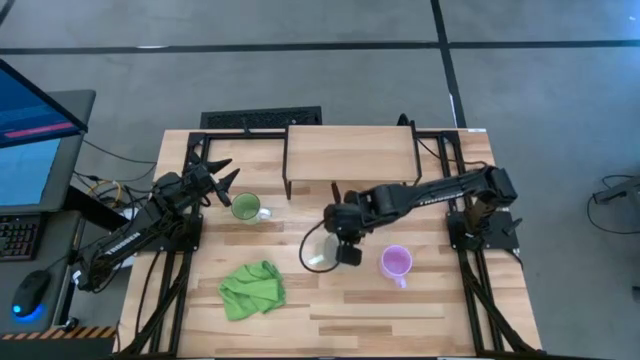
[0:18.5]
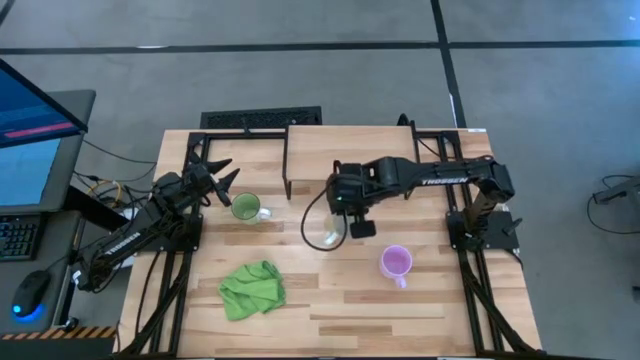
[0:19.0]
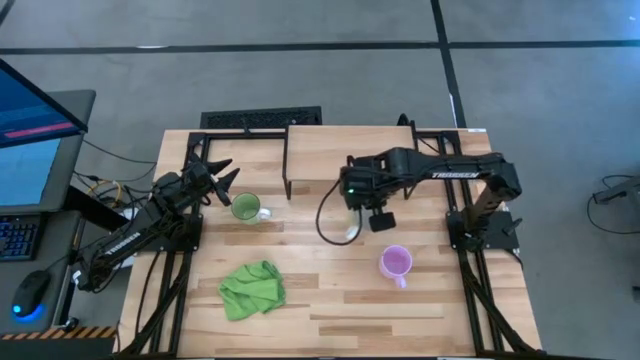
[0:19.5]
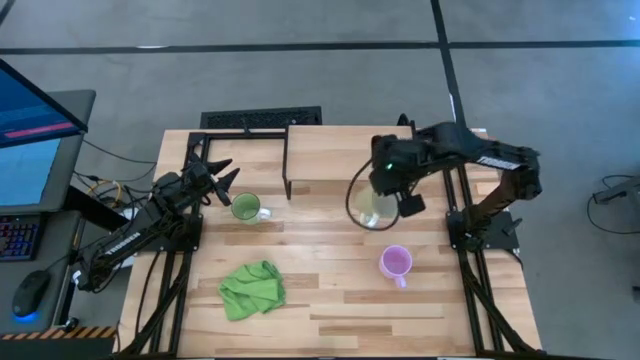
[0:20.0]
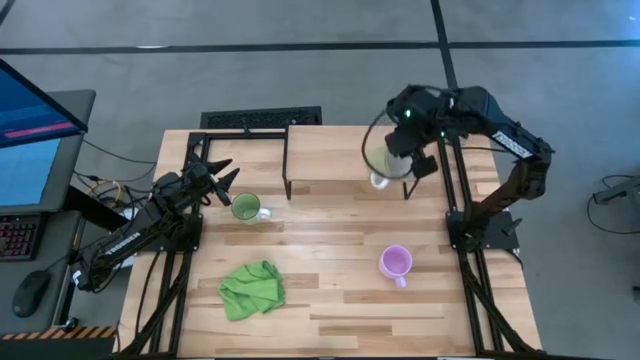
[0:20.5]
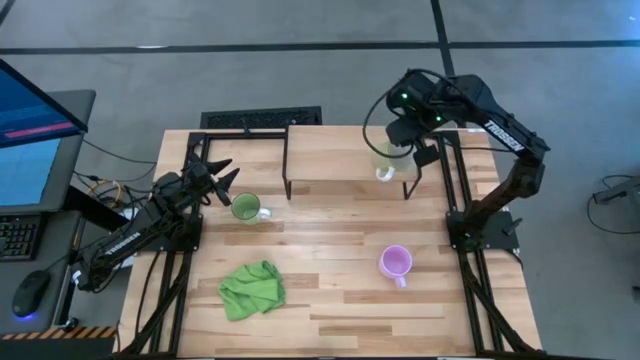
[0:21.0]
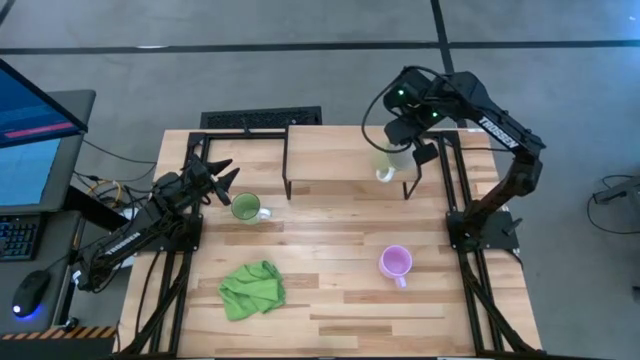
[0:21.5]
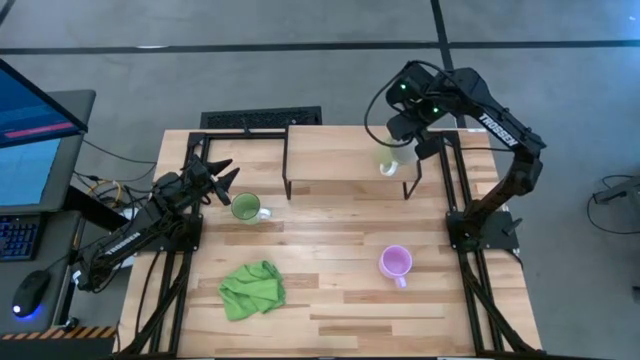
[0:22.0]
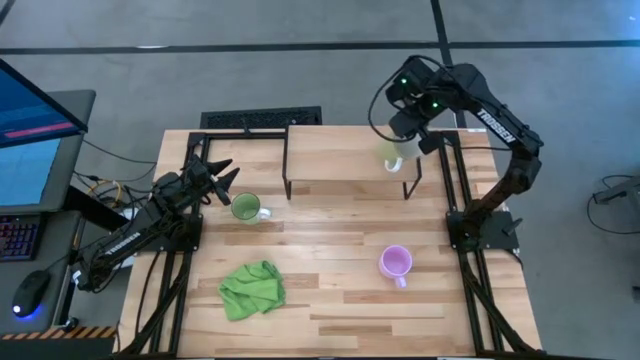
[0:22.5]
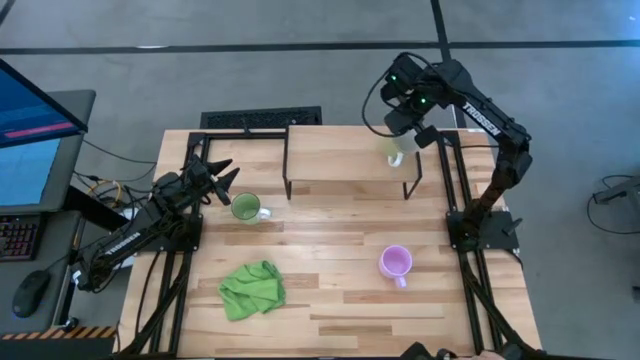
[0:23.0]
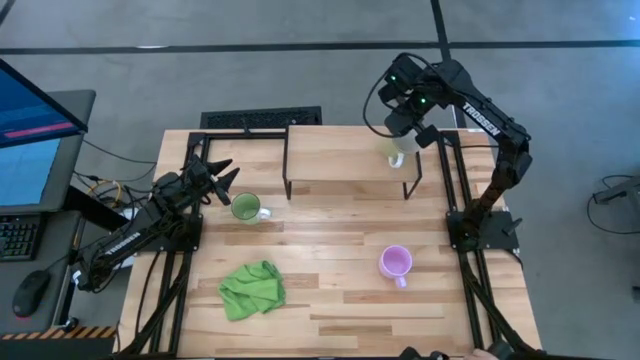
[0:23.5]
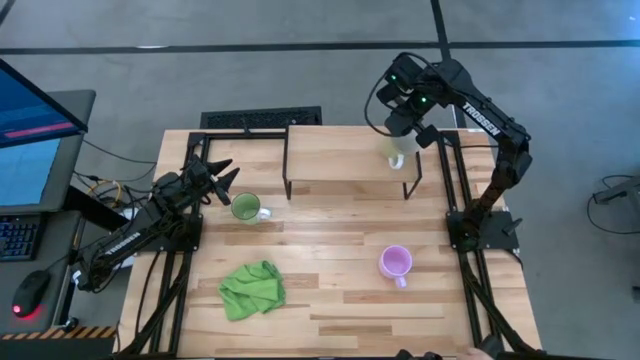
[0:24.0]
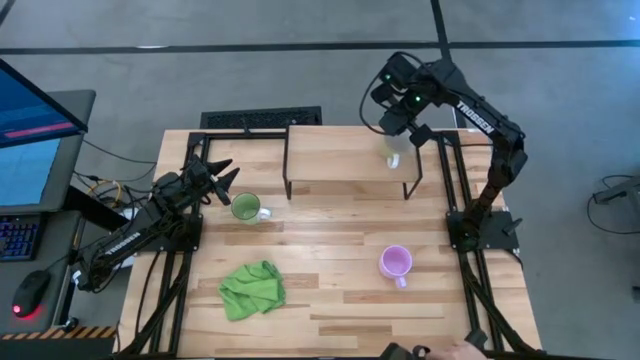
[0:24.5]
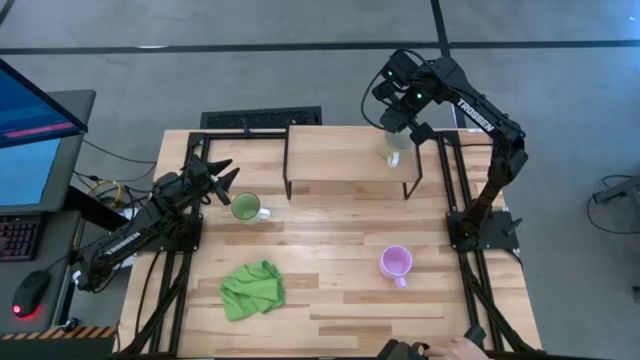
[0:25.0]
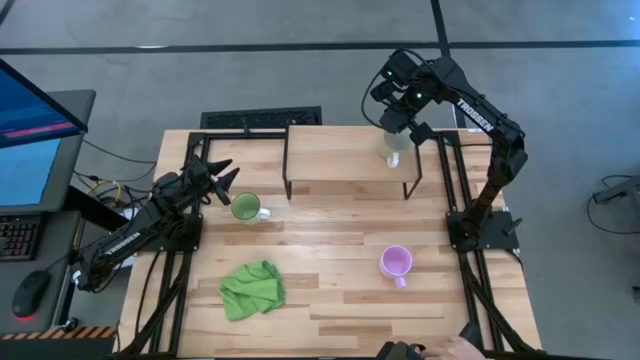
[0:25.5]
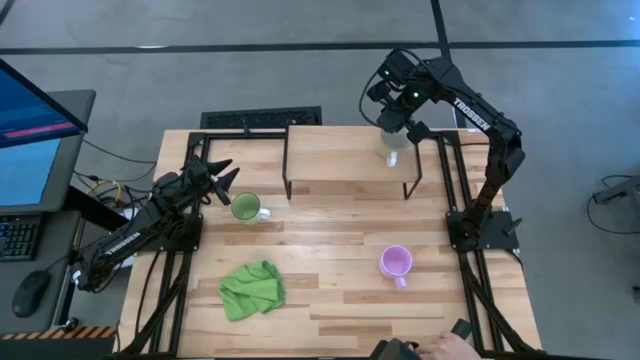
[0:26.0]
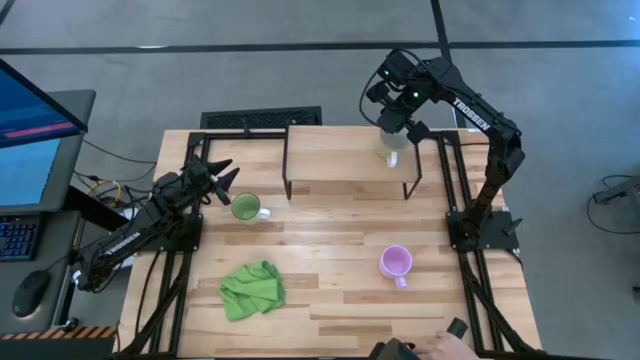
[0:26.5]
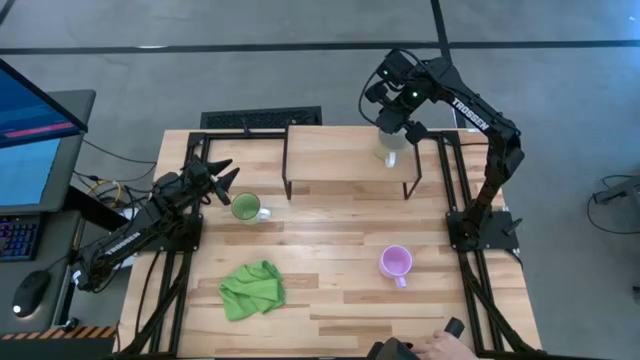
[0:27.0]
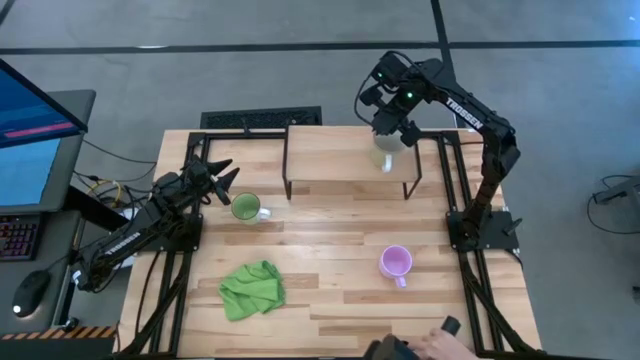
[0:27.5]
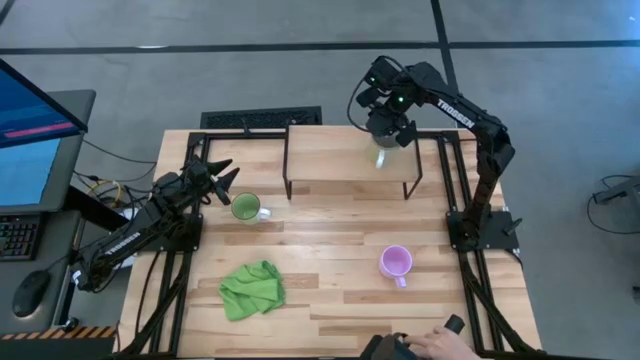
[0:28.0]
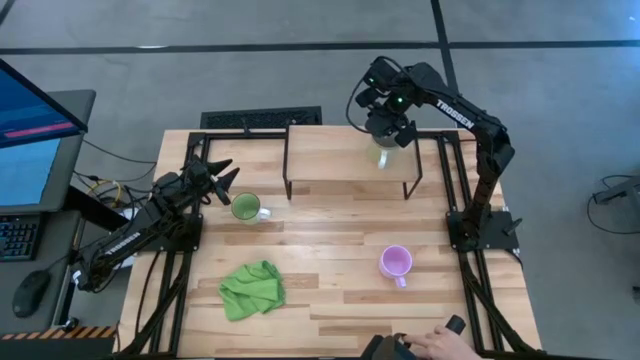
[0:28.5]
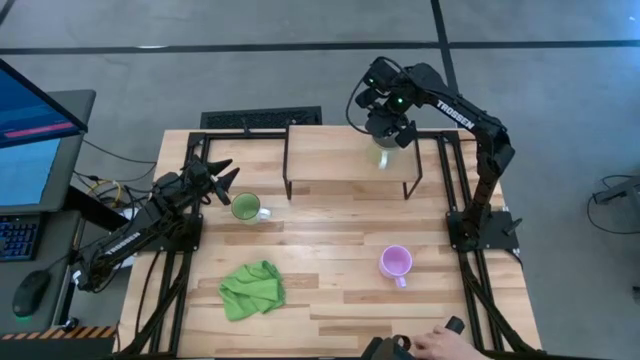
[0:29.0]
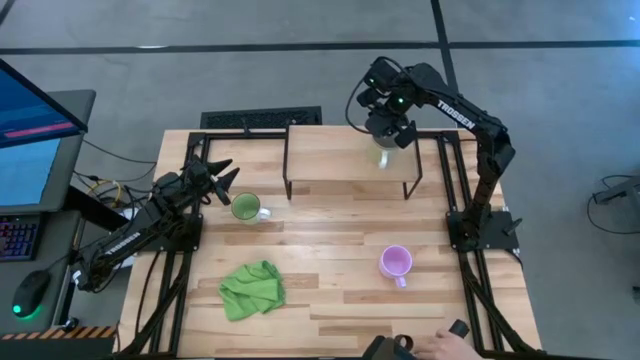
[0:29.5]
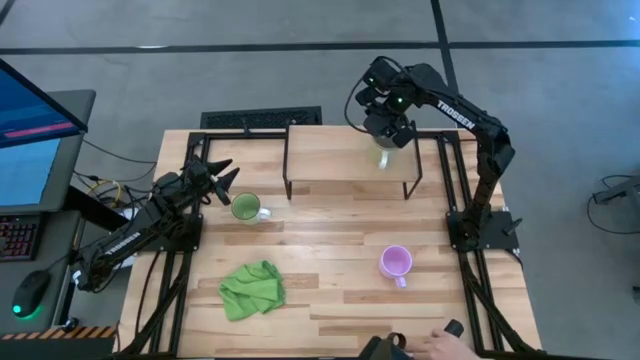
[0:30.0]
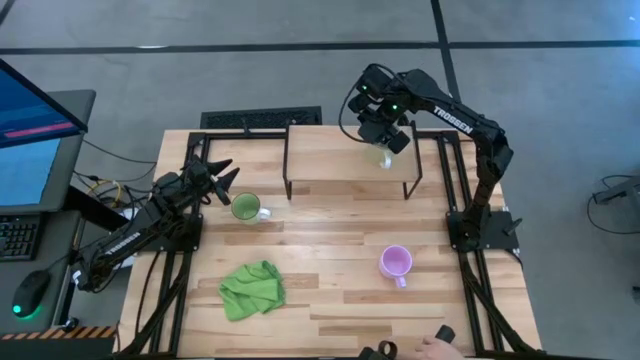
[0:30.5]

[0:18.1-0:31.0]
Task: Stack small to large cups/mugs on shelf
Put the yellow mug on the shelf

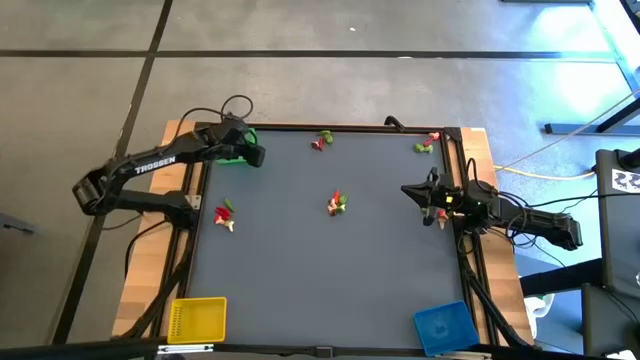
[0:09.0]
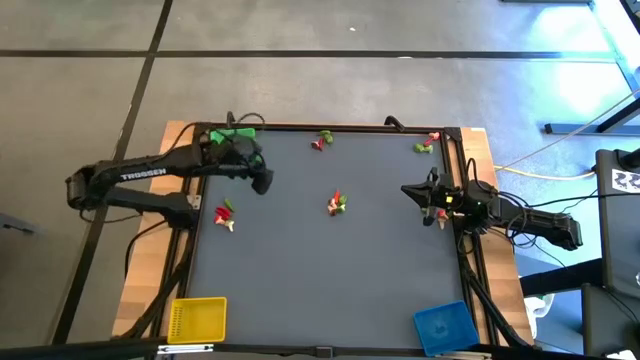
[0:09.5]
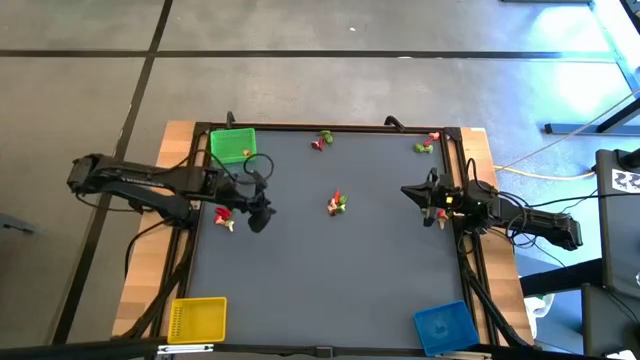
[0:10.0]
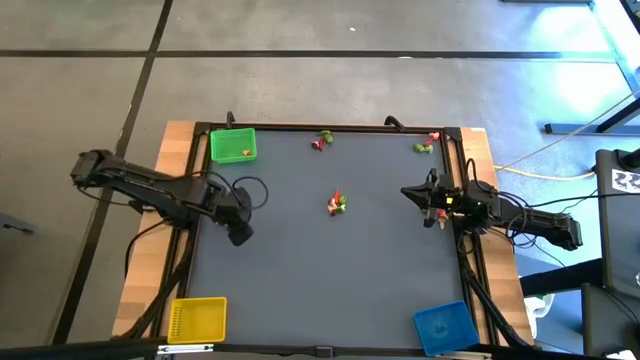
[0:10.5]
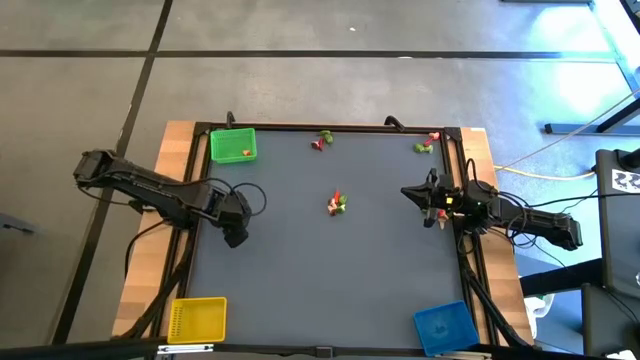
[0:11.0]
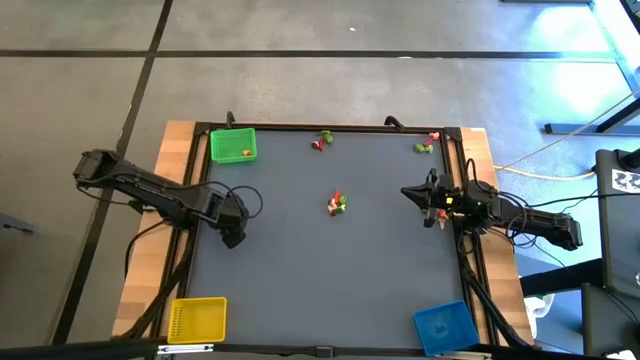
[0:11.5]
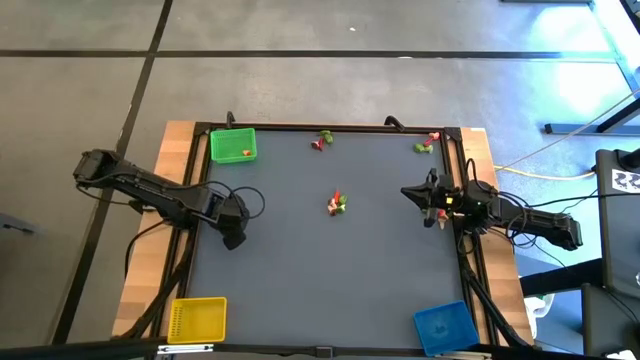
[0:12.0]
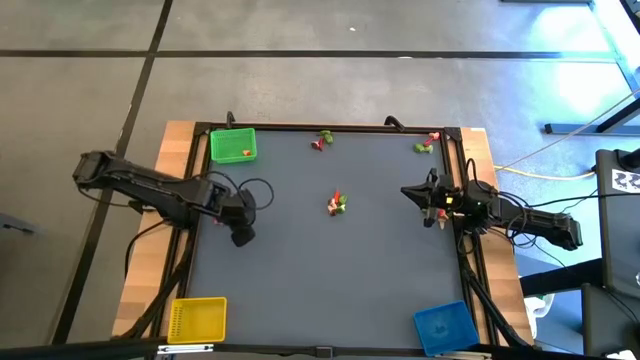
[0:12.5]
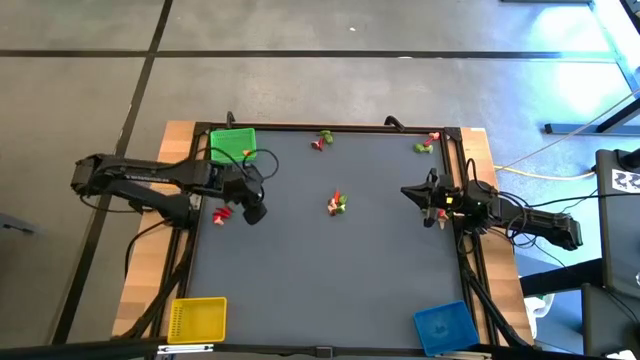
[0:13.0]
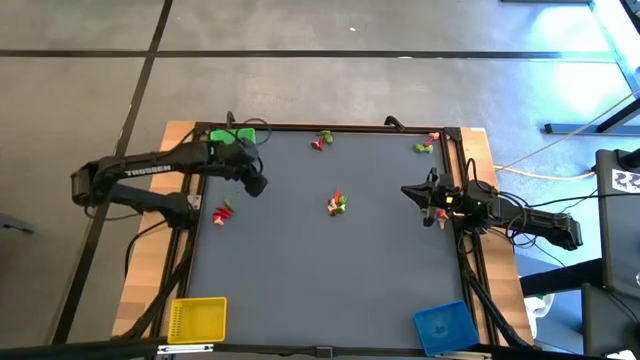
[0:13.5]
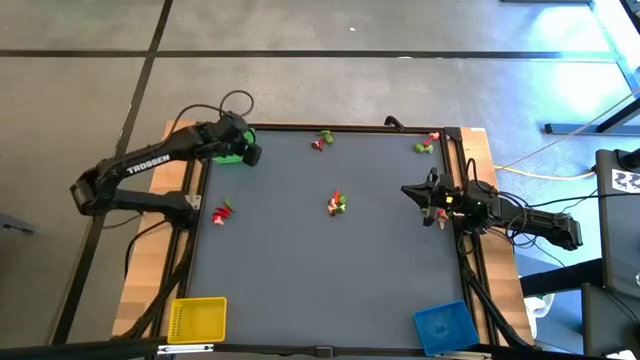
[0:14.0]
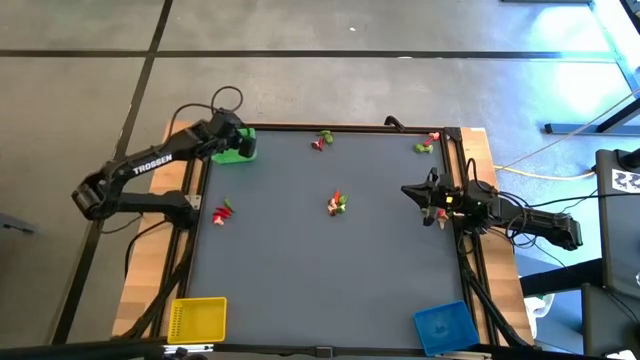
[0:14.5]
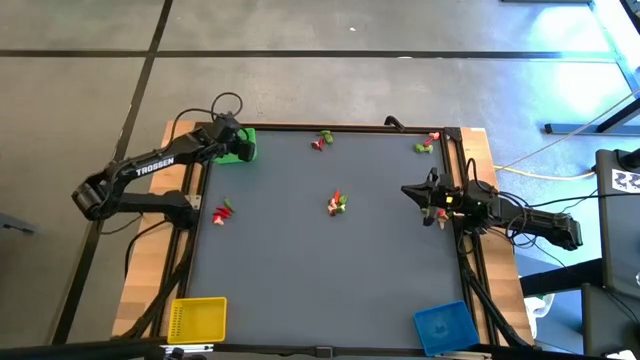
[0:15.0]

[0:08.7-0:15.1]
Task: Sort produce into baskets
Put the green mushroom into the green bin
